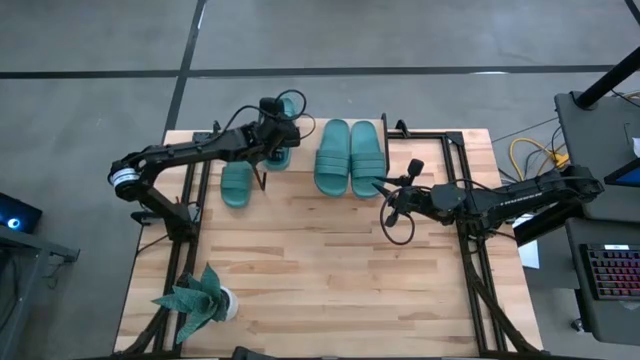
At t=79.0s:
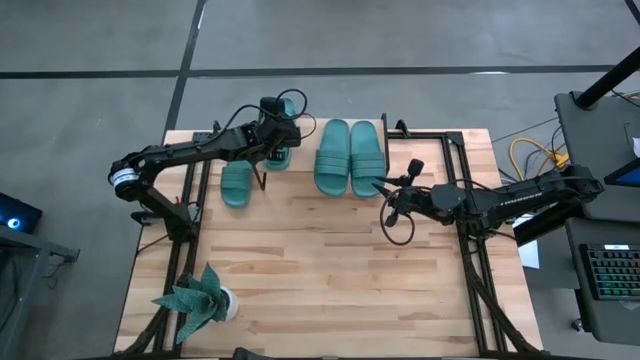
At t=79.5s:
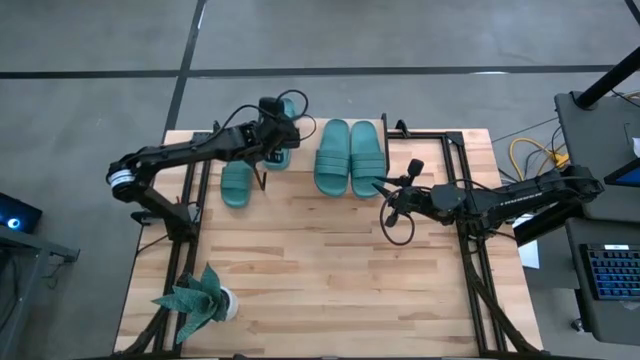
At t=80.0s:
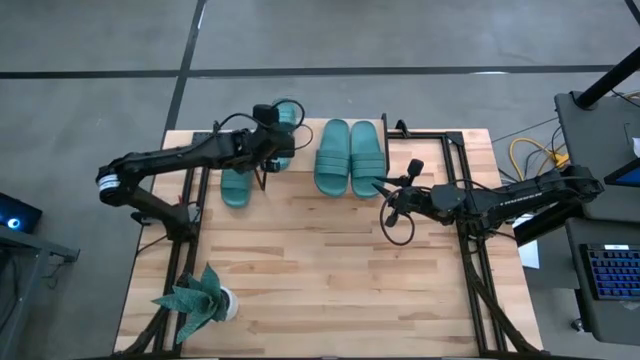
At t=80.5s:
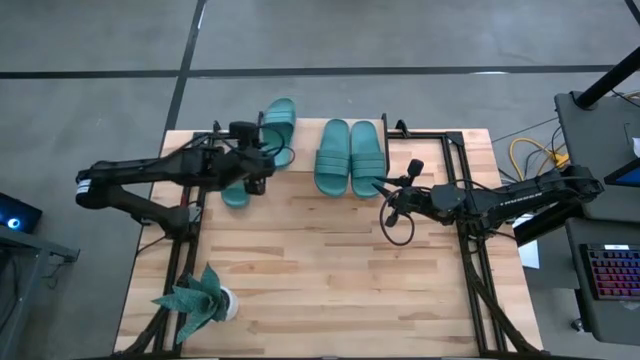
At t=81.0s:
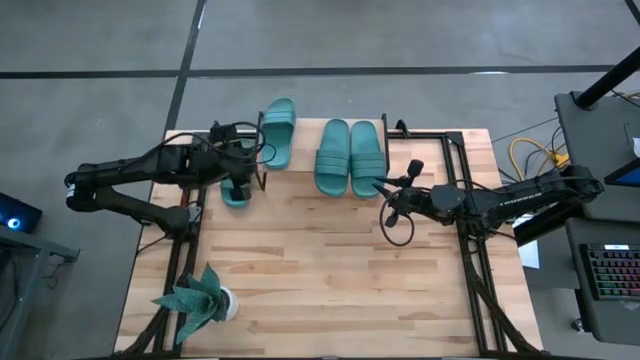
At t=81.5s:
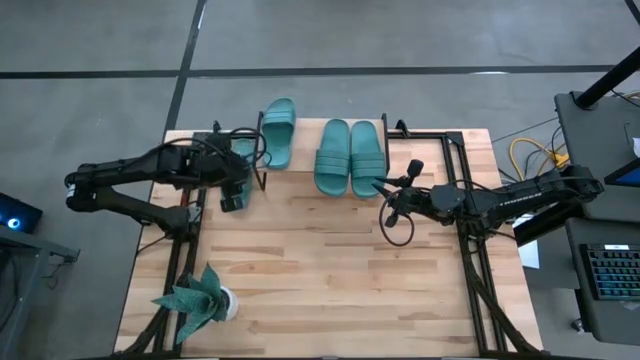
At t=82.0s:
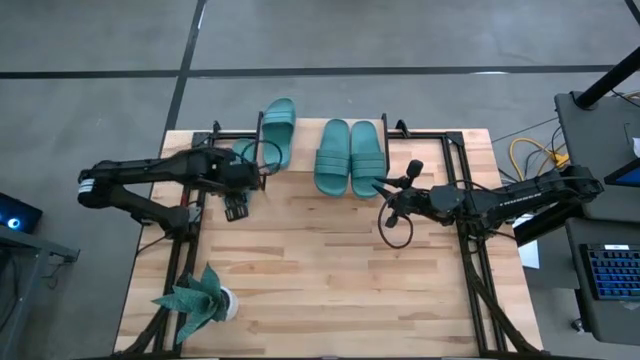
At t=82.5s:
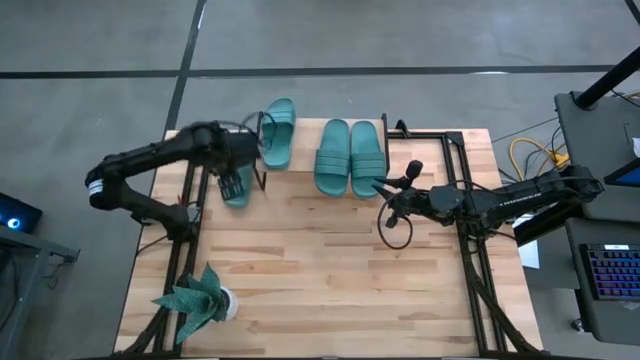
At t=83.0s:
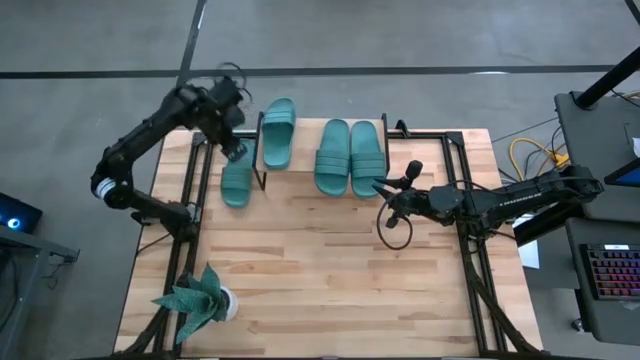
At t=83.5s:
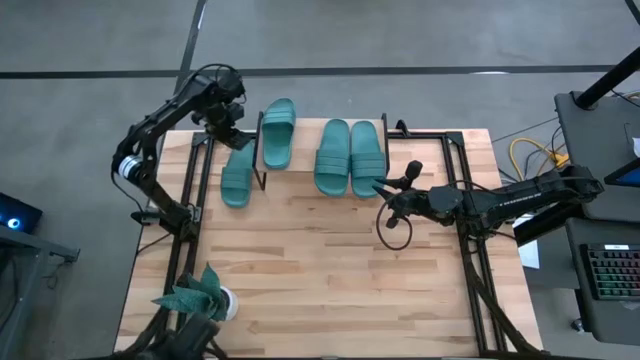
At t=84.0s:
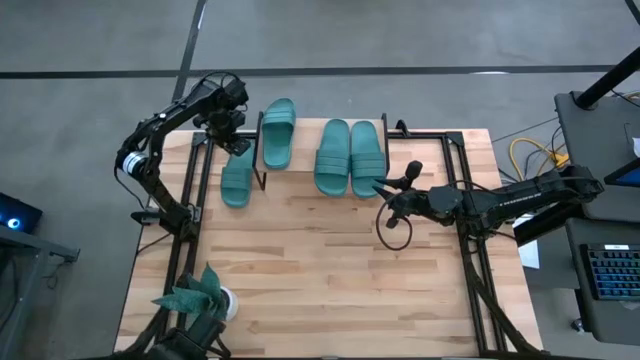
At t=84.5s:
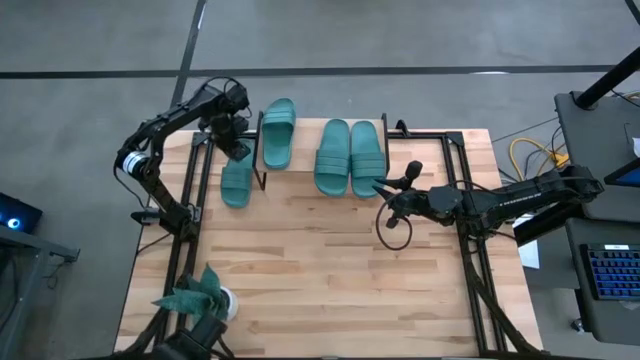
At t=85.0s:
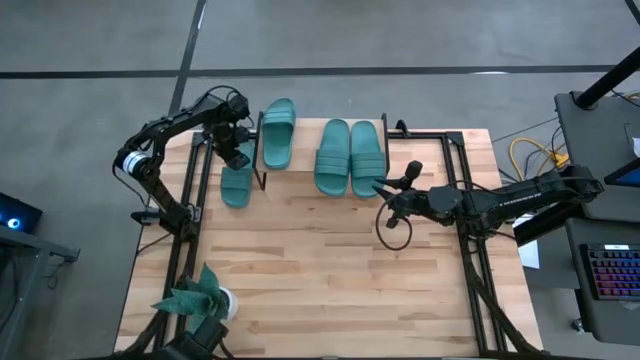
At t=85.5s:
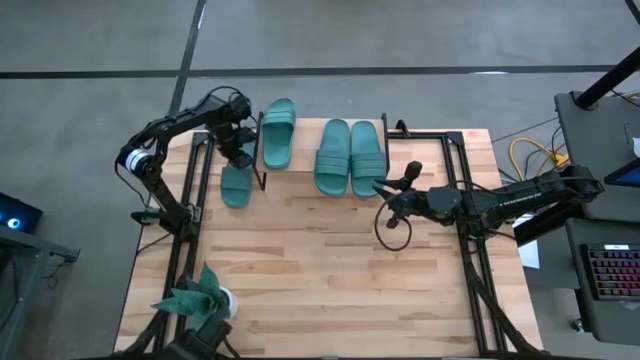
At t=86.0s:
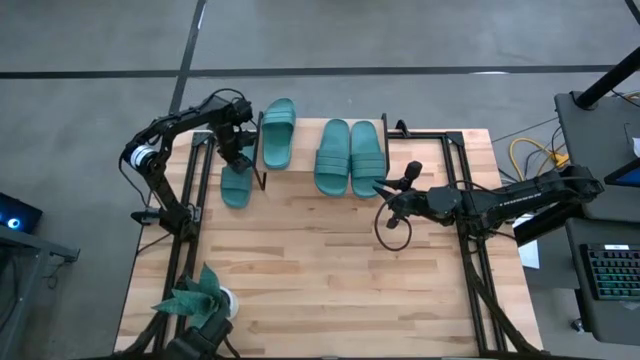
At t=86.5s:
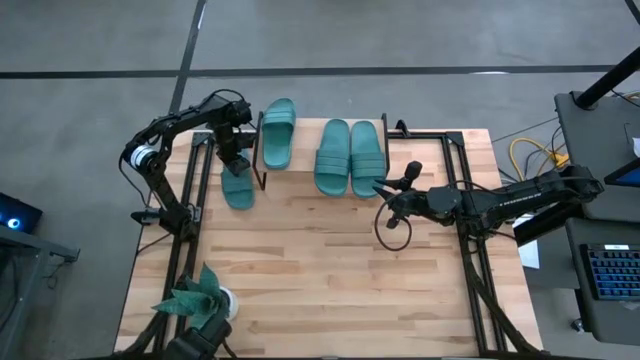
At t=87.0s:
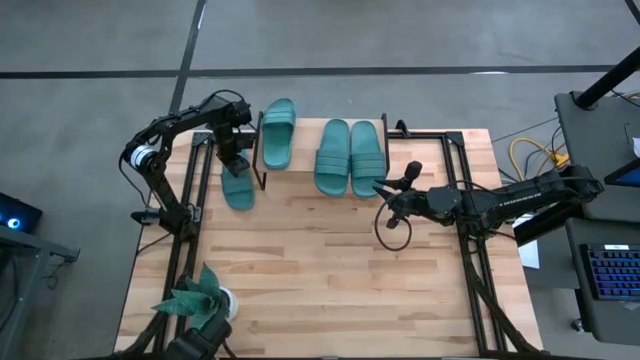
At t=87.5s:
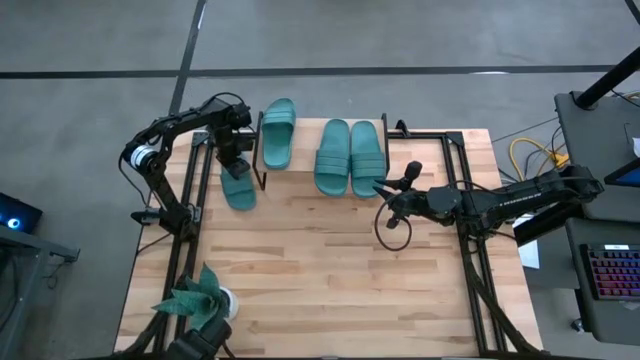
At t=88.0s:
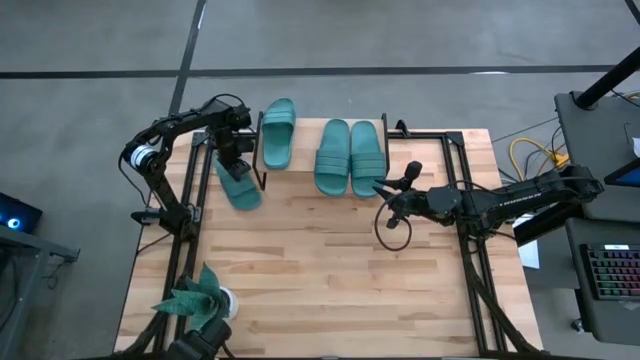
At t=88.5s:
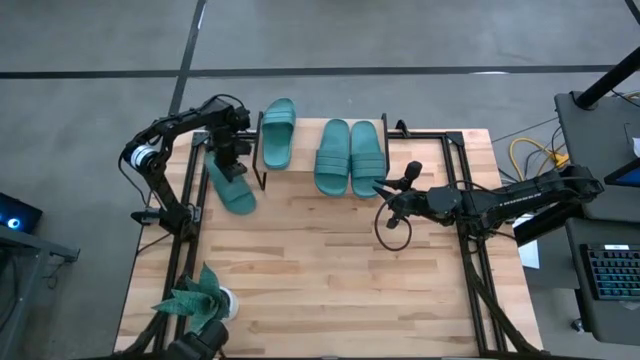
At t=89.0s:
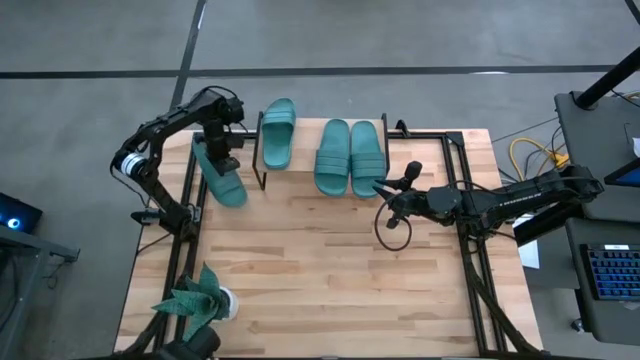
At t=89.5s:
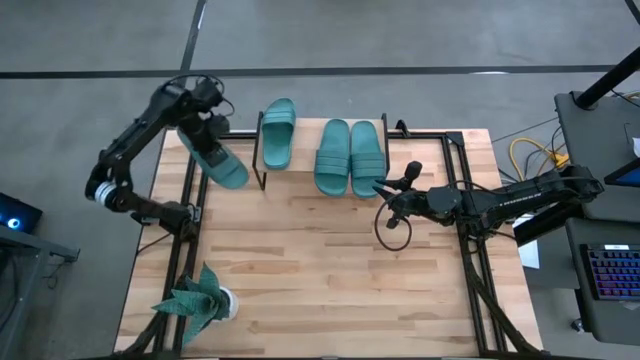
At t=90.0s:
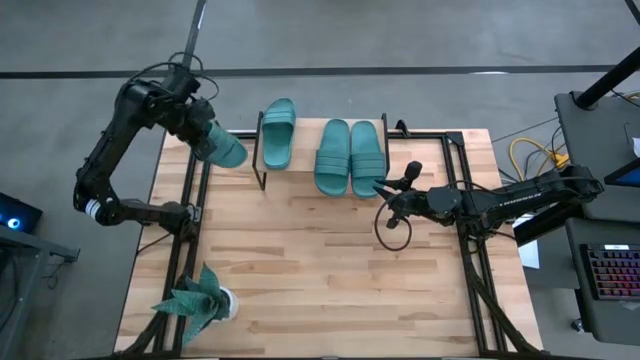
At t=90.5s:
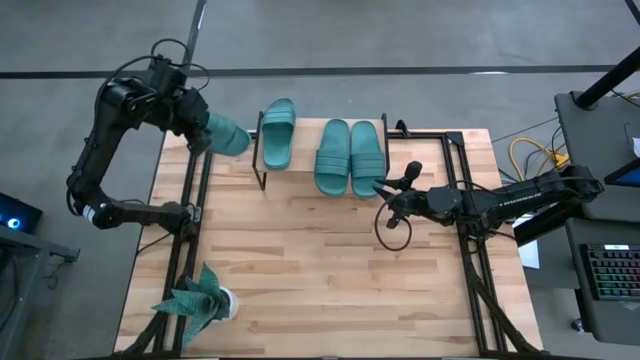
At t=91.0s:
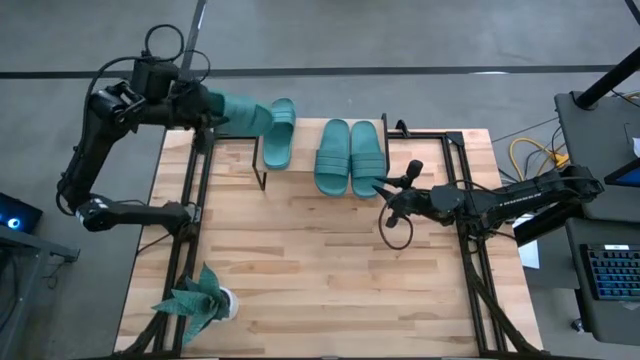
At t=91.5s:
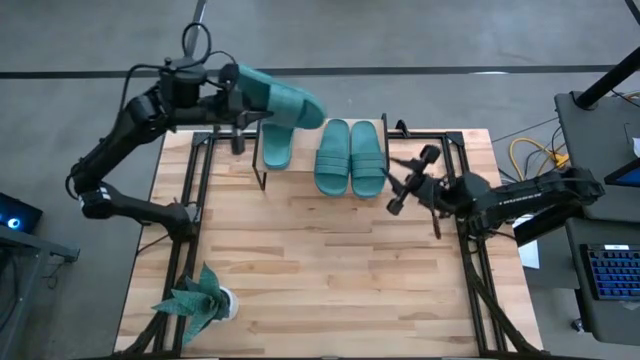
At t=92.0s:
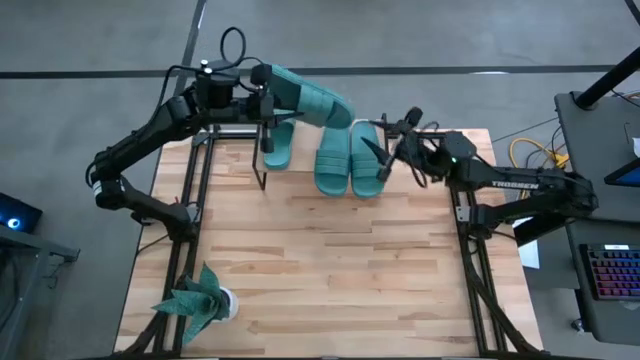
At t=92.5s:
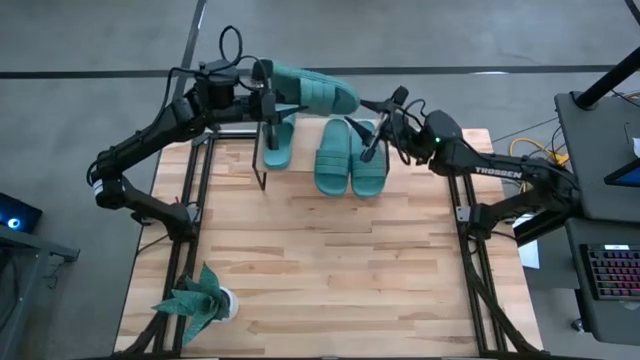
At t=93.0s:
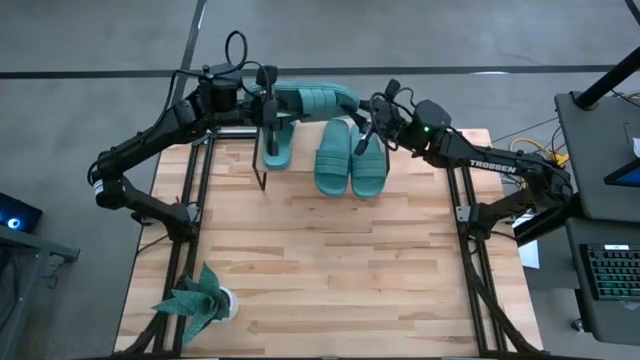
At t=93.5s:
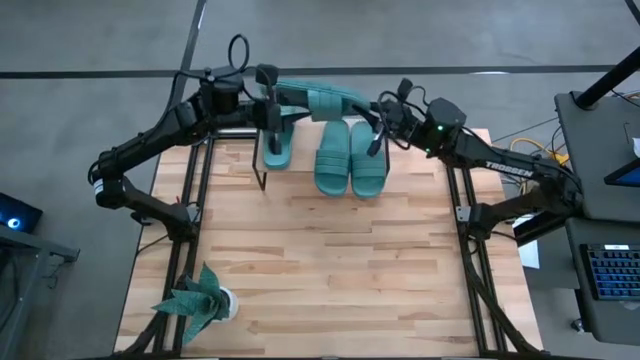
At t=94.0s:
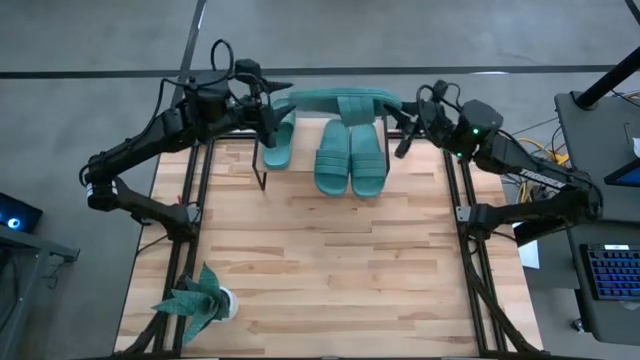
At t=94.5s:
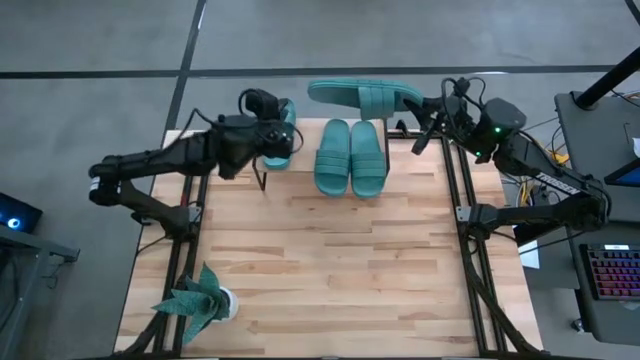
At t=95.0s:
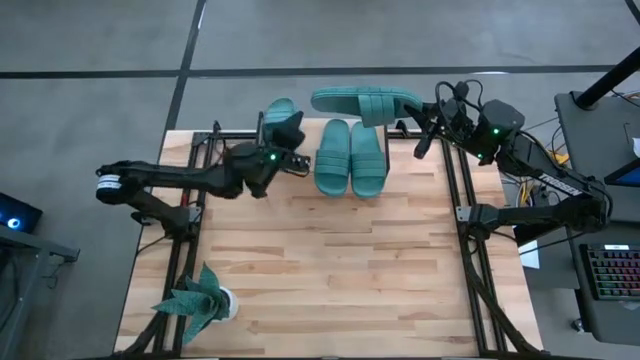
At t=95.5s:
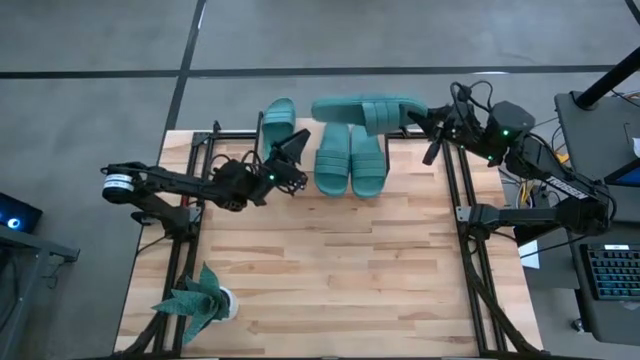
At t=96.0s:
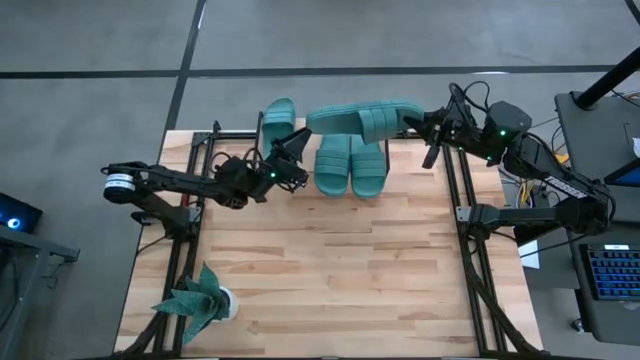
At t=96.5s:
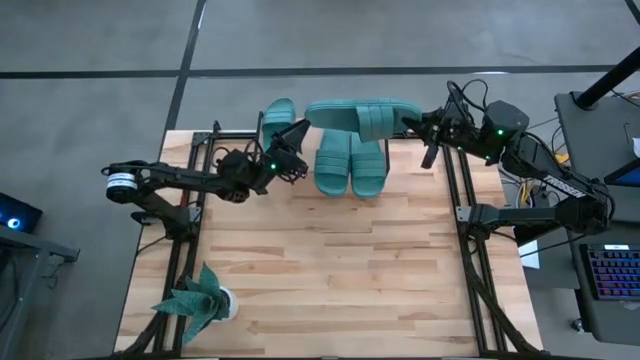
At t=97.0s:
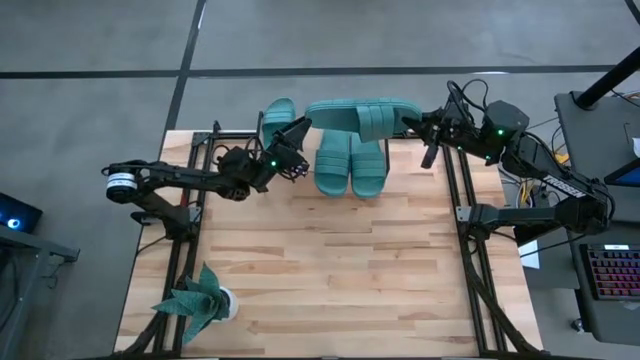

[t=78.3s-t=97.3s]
Task: Pick and place slides into the shelf
Put the green slide on the shelf
